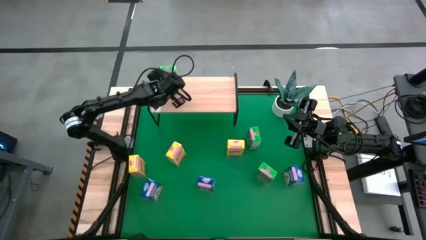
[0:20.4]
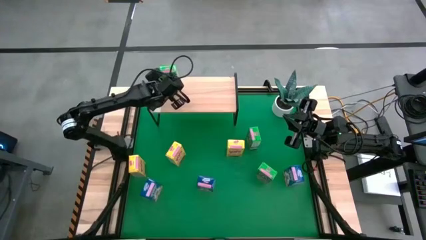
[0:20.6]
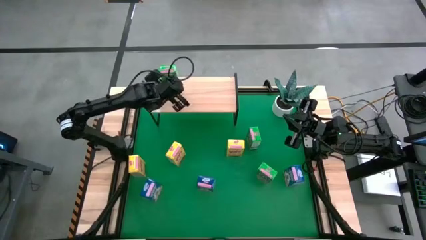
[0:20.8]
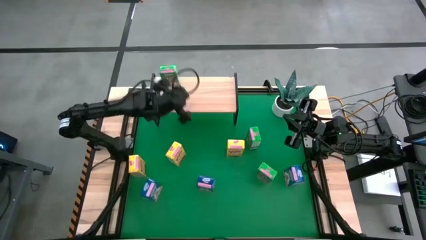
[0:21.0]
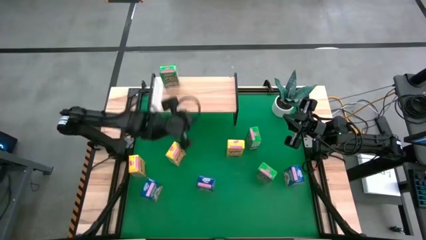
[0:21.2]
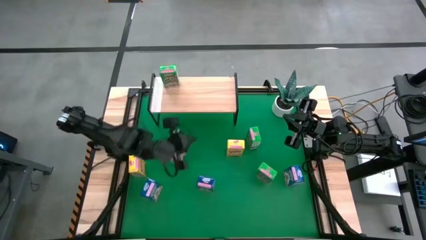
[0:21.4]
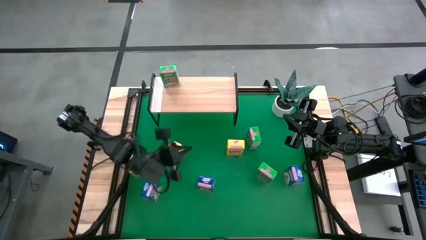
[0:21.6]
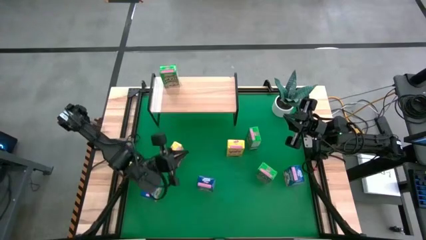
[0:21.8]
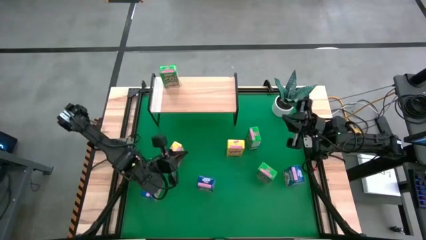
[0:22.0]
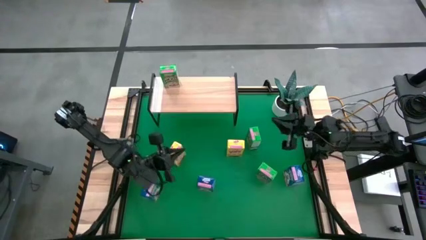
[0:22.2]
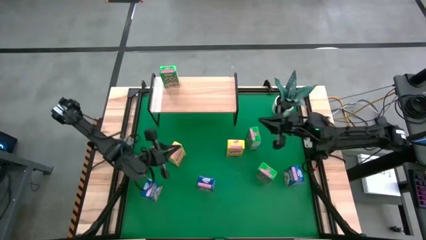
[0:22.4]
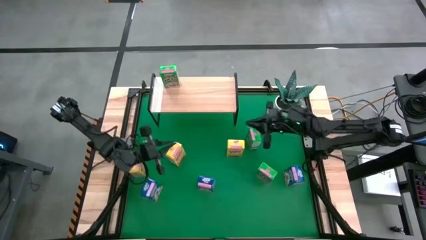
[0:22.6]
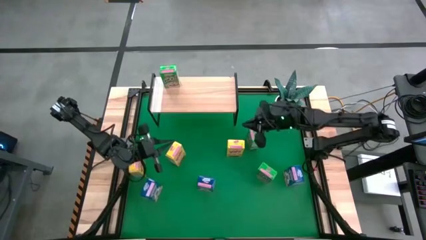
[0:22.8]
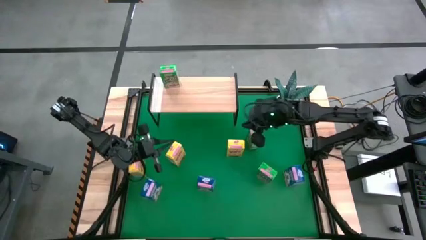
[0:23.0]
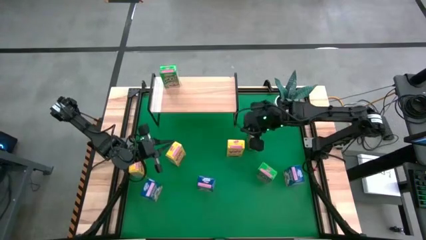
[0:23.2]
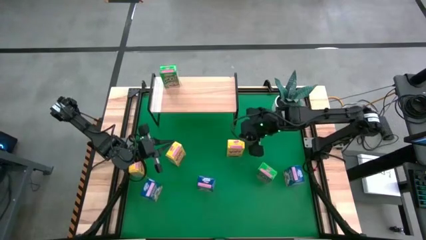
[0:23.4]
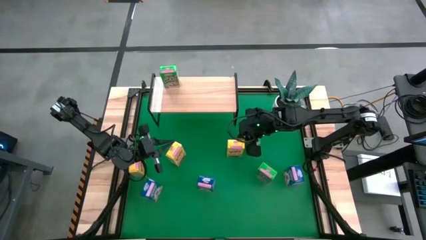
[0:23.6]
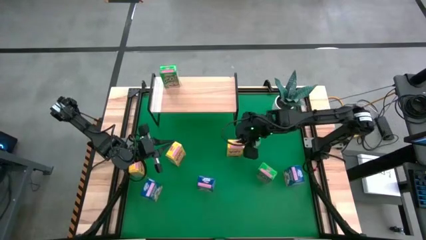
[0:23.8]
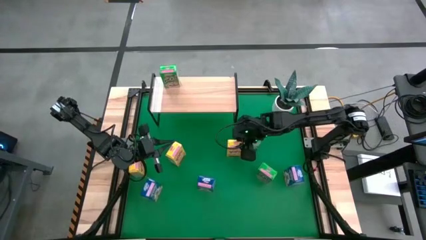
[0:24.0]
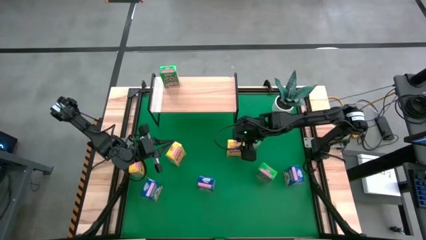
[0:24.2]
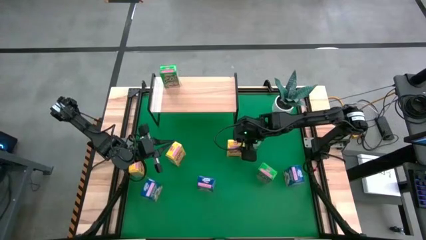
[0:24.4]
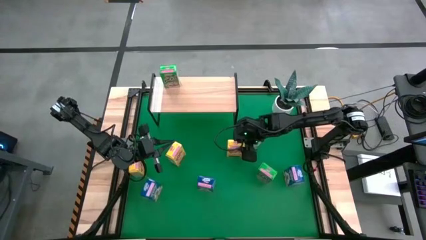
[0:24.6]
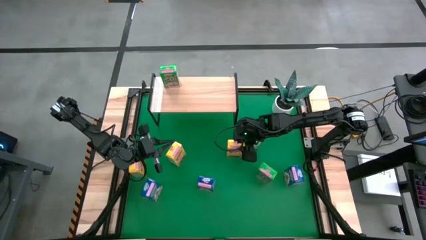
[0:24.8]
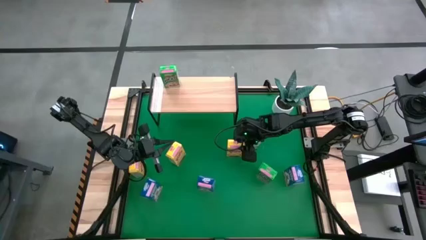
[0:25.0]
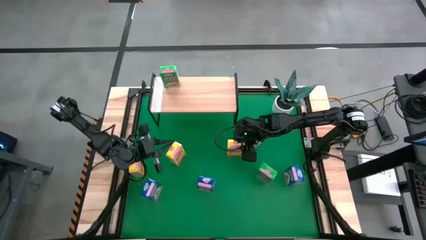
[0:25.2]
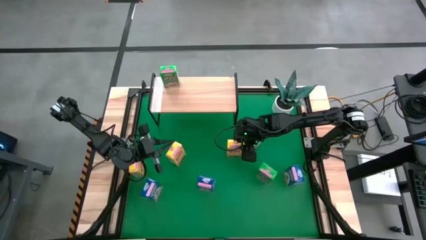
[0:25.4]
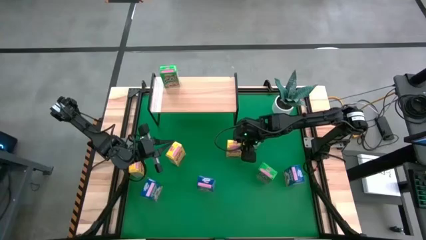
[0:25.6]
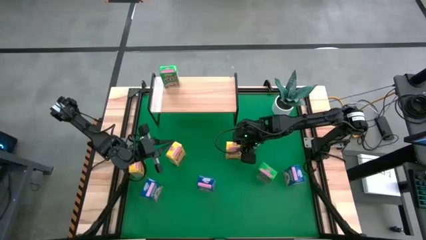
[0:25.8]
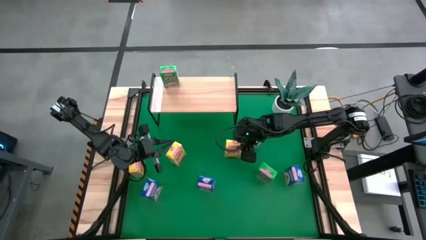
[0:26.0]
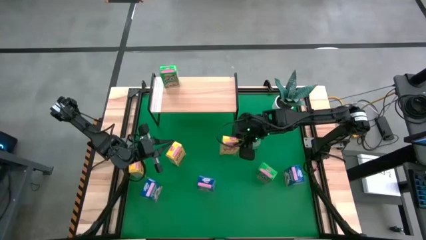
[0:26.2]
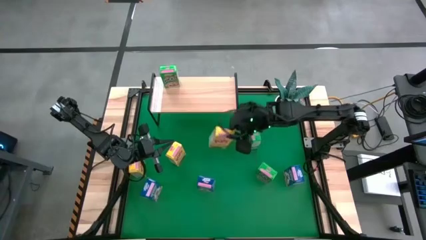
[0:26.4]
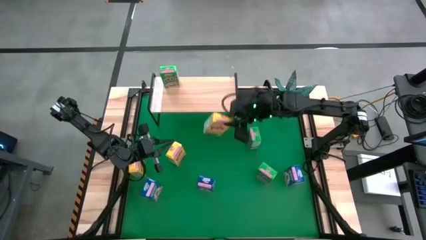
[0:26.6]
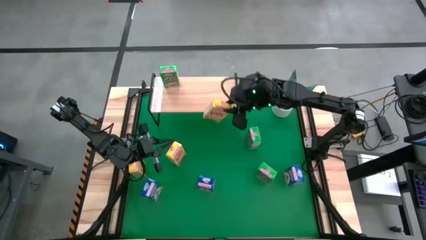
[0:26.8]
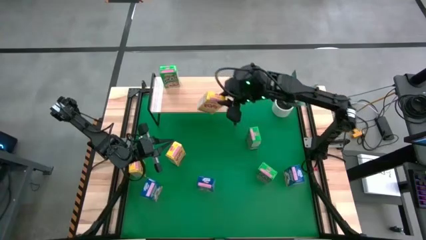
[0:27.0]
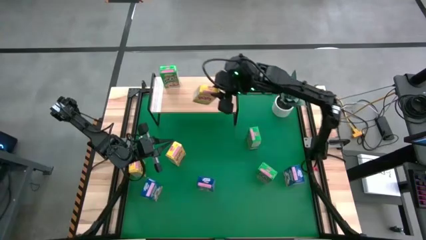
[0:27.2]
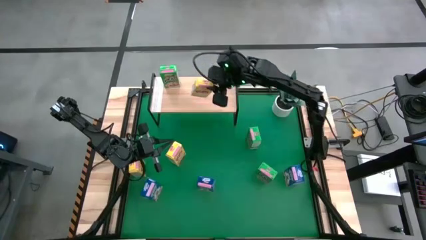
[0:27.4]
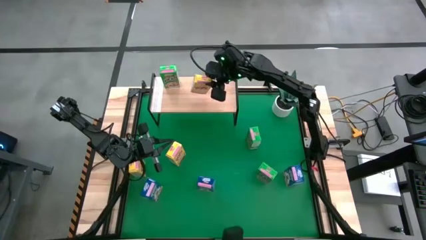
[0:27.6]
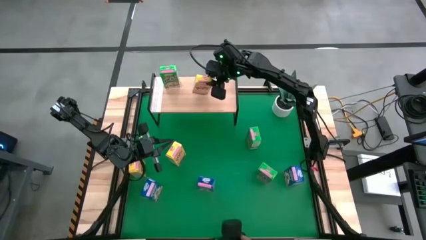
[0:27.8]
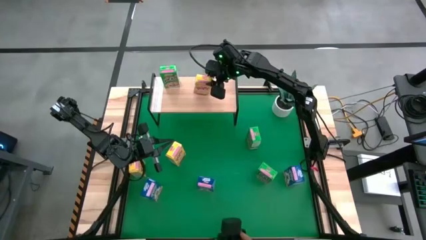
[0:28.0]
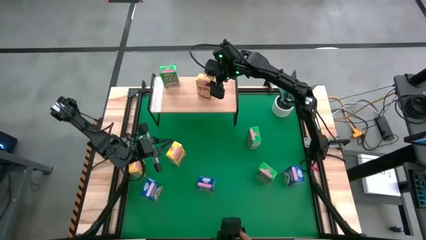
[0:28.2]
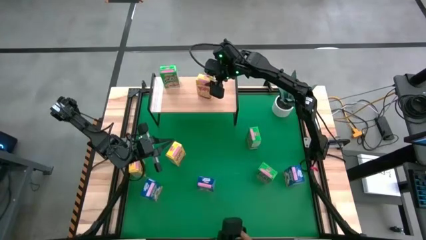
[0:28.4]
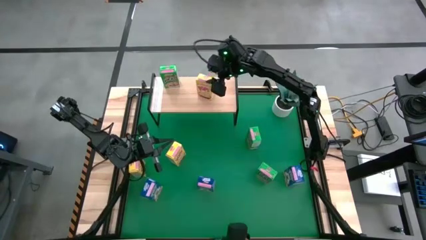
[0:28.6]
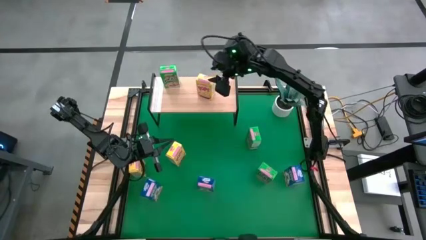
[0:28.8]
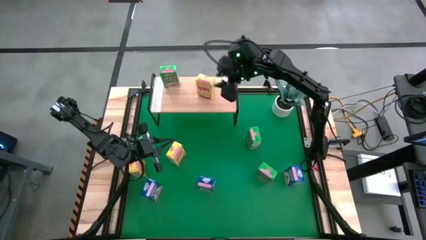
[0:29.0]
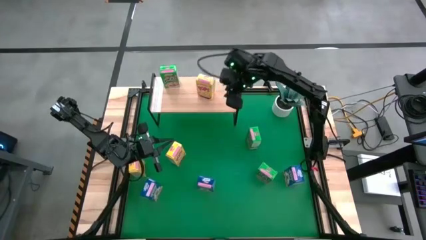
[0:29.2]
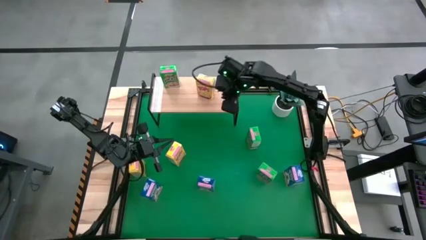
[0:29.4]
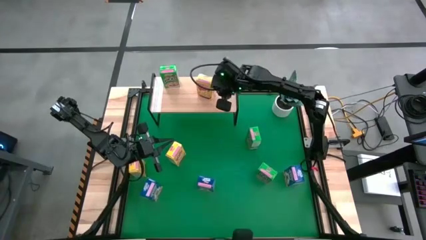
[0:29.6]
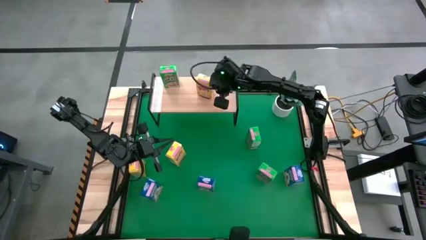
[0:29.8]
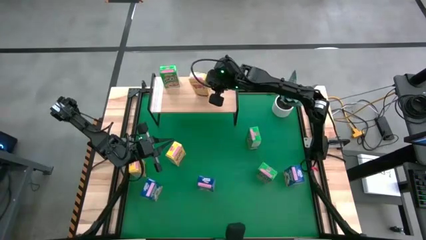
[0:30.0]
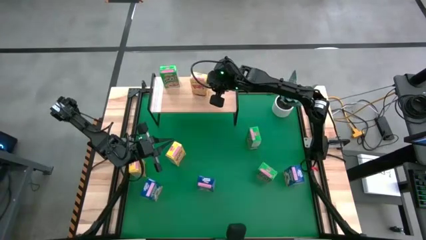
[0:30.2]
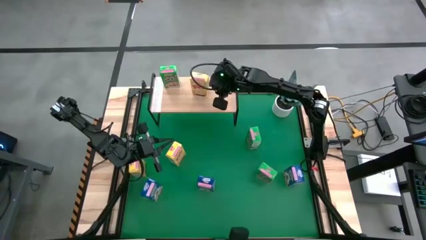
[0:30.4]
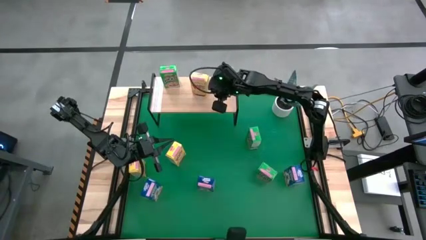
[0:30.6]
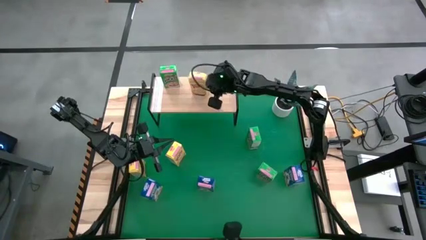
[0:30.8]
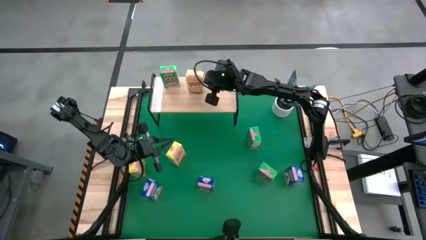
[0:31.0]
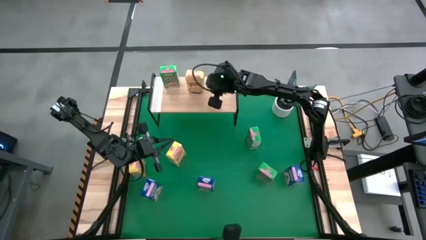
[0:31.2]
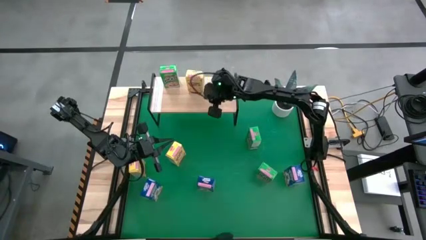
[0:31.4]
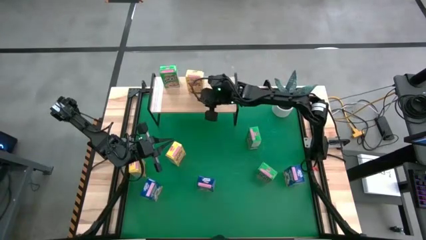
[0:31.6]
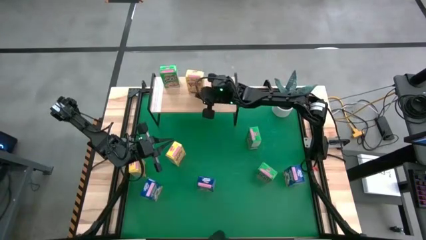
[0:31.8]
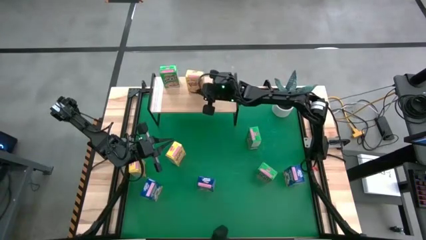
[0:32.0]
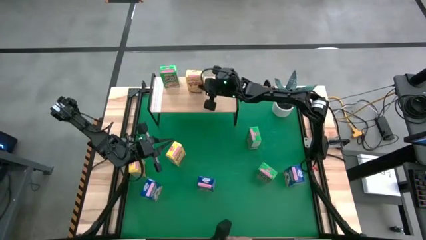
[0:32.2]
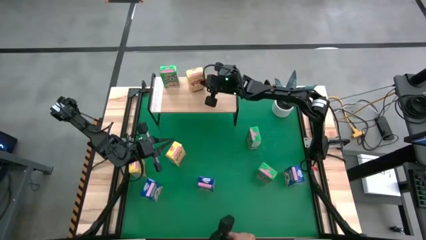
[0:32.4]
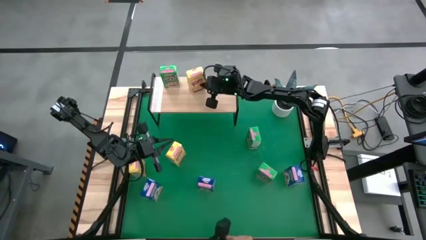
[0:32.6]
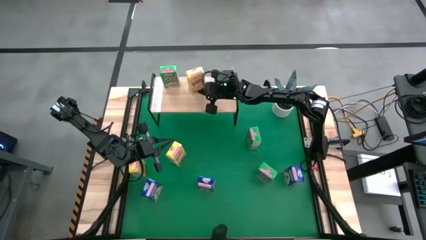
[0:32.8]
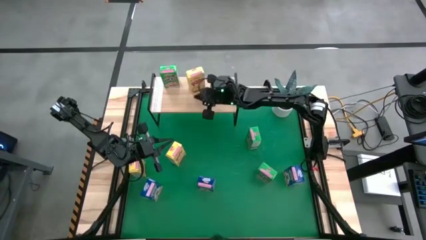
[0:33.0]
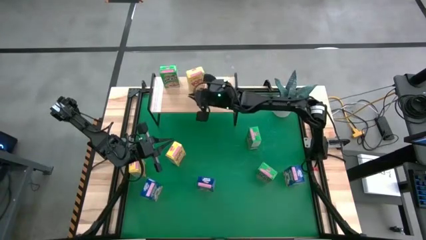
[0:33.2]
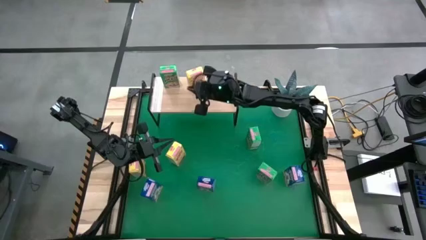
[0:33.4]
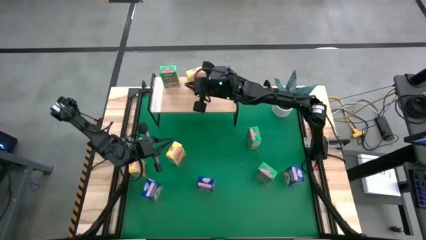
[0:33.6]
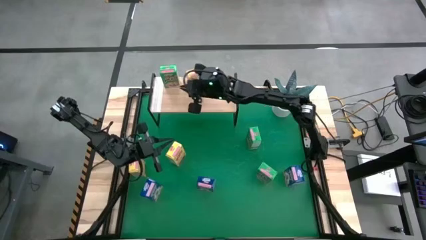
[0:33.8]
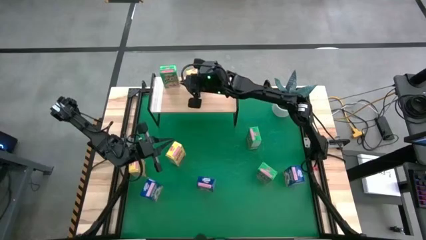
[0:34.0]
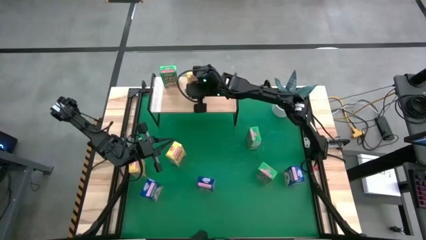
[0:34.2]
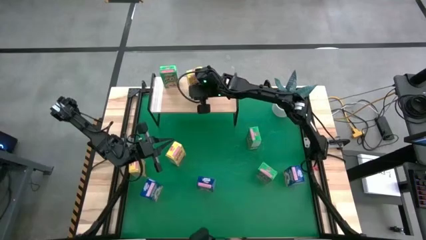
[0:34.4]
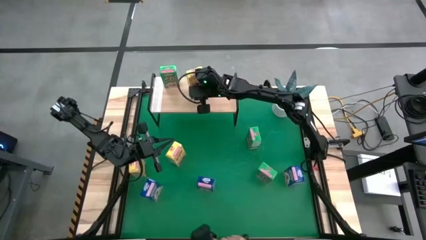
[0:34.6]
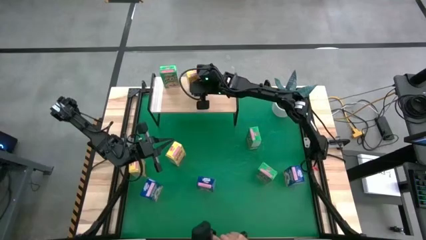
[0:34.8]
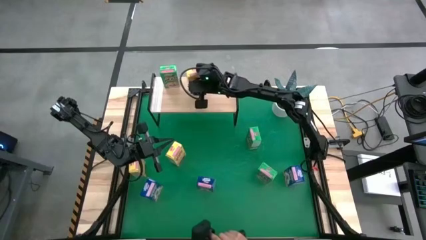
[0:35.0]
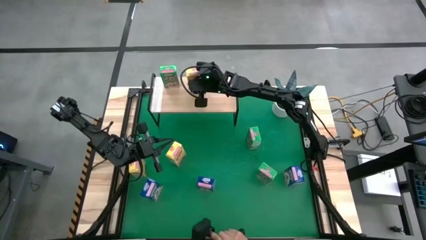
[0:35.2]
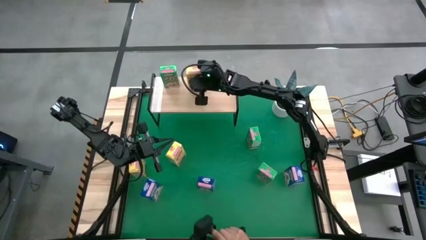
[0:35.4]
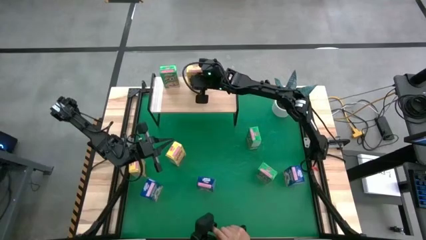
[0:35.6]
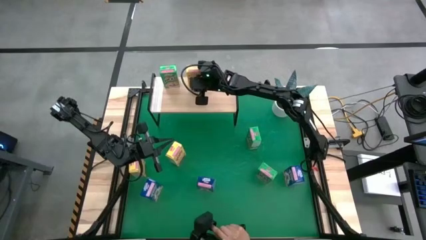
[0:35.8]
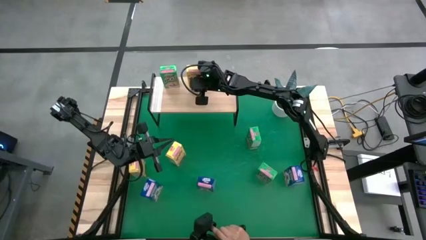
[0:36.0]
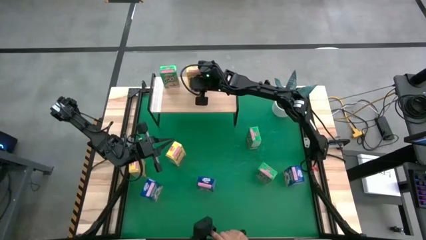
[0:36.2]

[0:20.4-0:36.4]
Task: Stack cereal on shelf
Put the right yellow cereal box on the shelf
